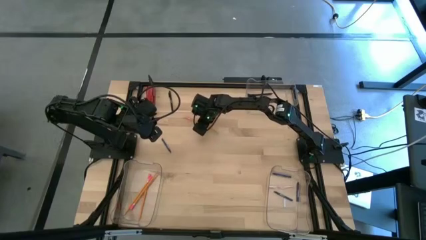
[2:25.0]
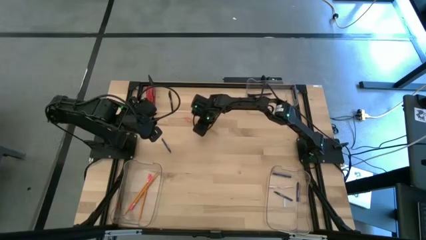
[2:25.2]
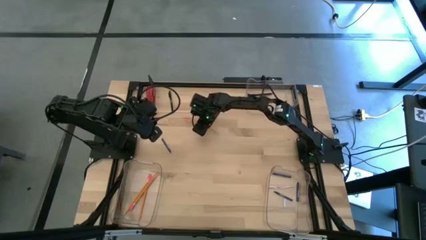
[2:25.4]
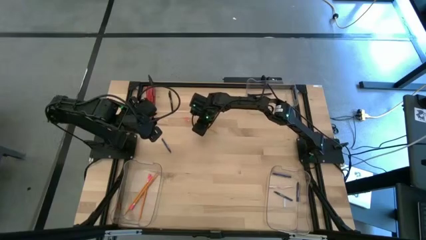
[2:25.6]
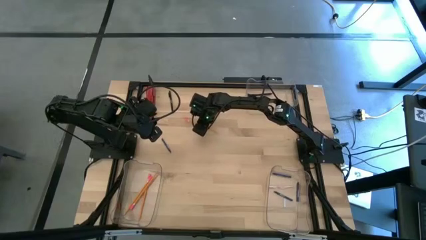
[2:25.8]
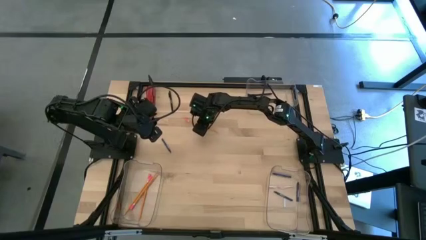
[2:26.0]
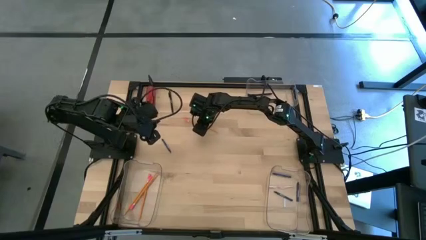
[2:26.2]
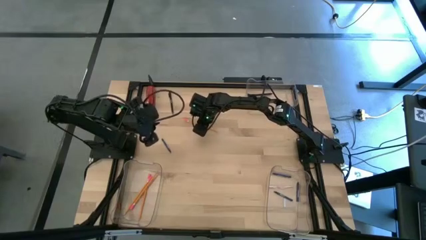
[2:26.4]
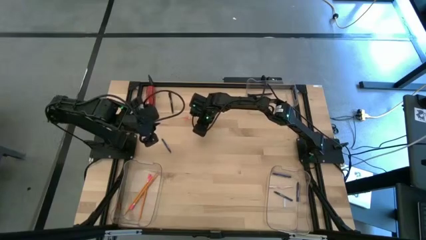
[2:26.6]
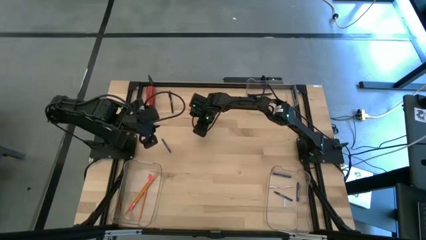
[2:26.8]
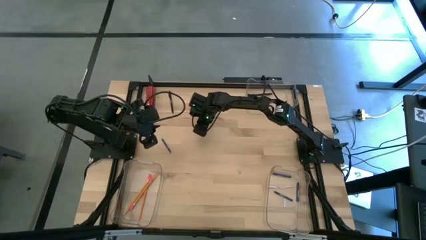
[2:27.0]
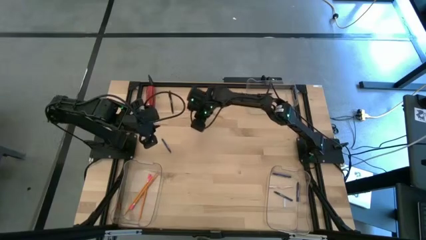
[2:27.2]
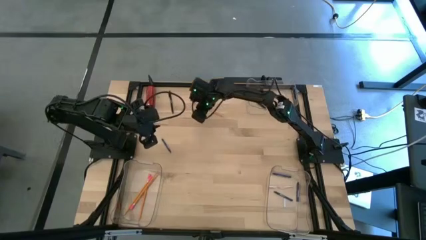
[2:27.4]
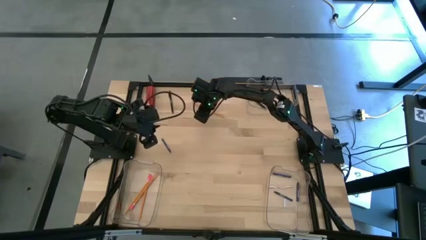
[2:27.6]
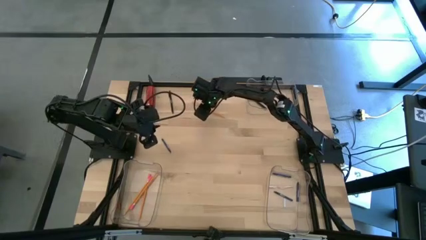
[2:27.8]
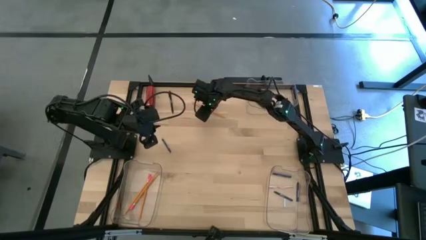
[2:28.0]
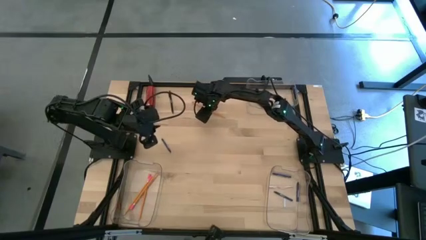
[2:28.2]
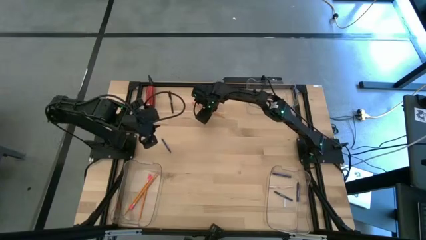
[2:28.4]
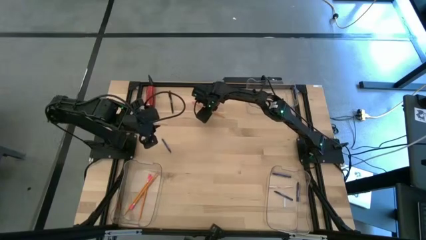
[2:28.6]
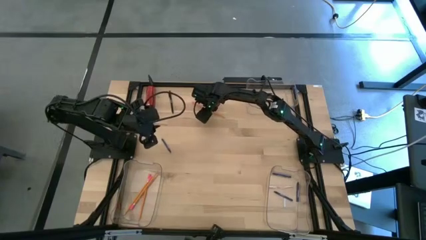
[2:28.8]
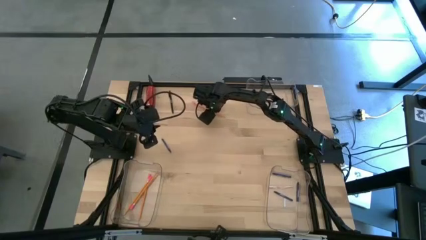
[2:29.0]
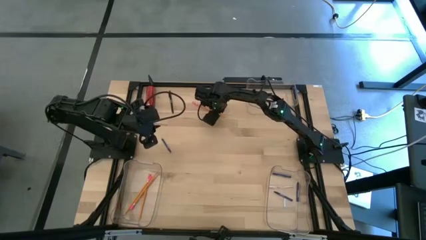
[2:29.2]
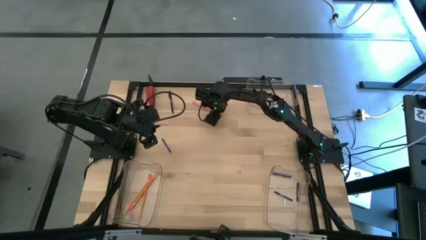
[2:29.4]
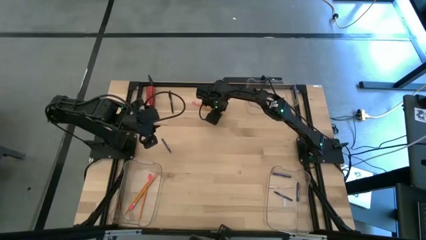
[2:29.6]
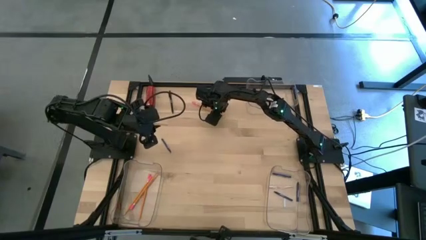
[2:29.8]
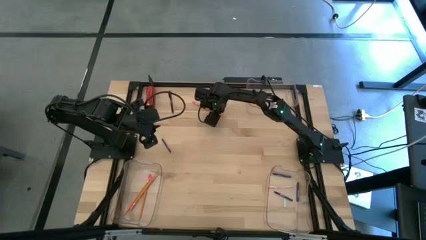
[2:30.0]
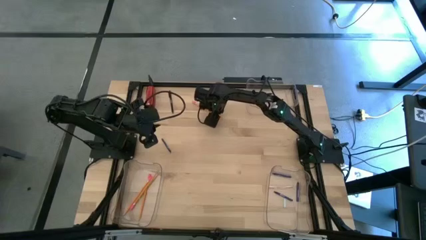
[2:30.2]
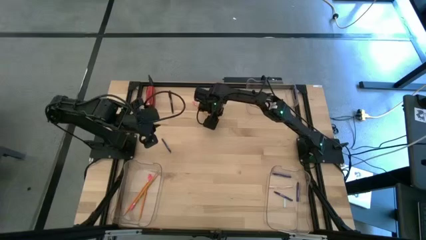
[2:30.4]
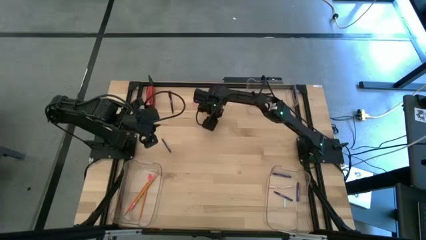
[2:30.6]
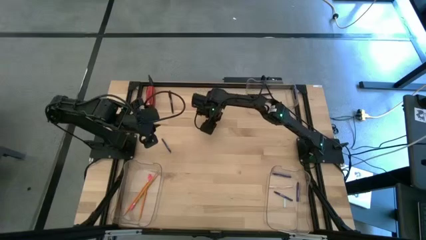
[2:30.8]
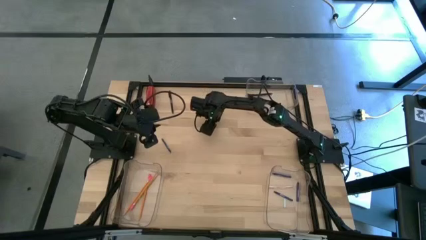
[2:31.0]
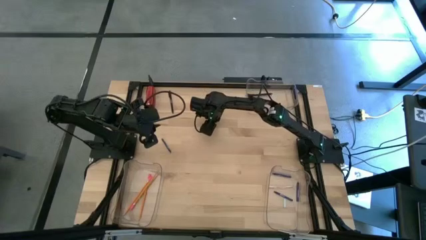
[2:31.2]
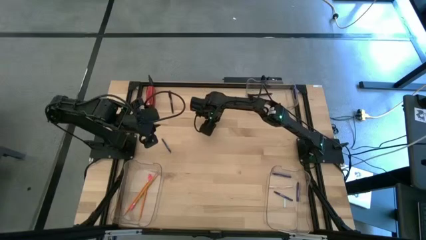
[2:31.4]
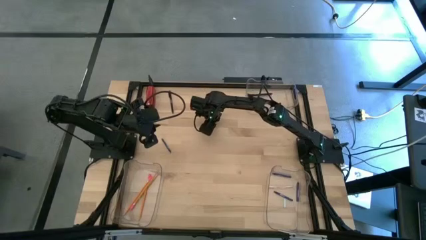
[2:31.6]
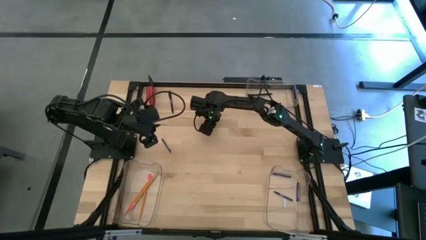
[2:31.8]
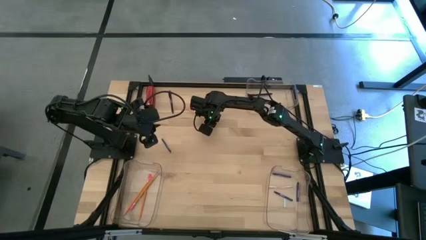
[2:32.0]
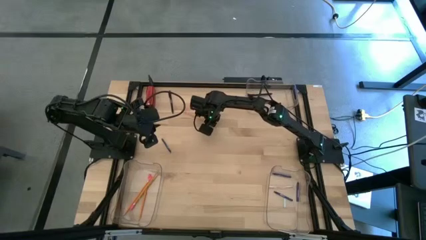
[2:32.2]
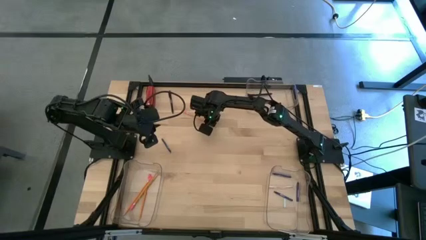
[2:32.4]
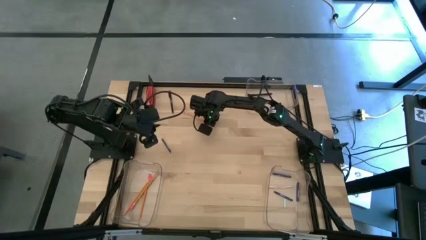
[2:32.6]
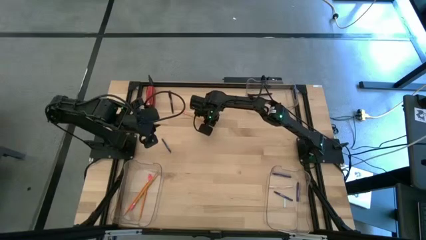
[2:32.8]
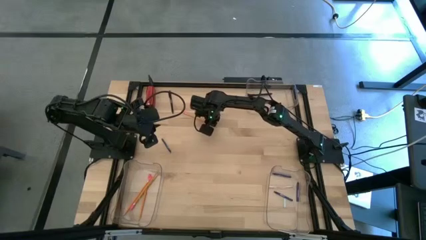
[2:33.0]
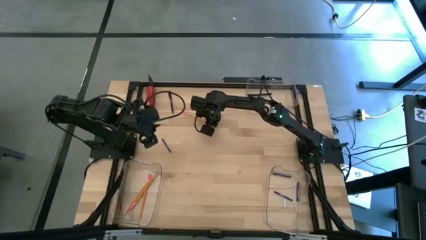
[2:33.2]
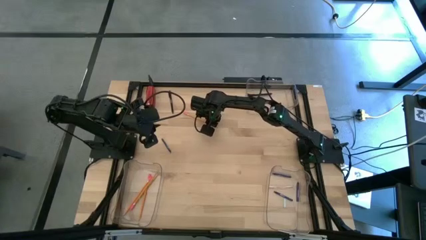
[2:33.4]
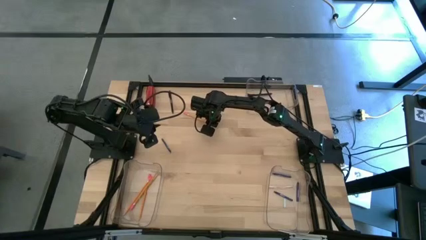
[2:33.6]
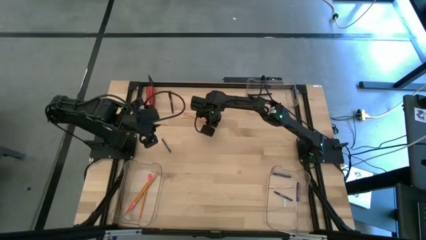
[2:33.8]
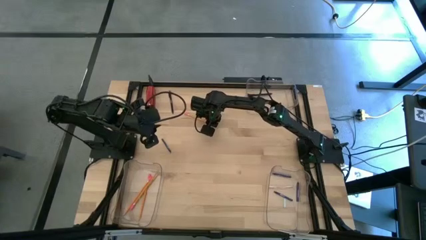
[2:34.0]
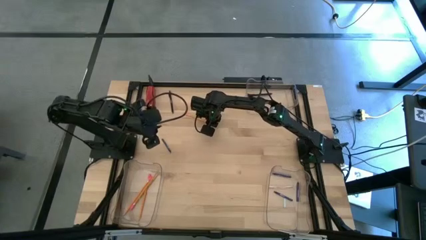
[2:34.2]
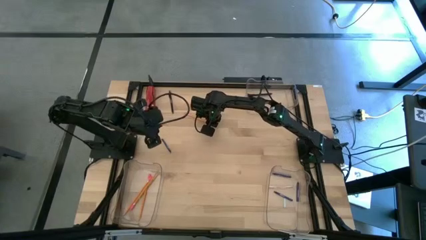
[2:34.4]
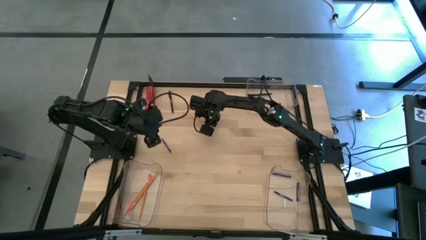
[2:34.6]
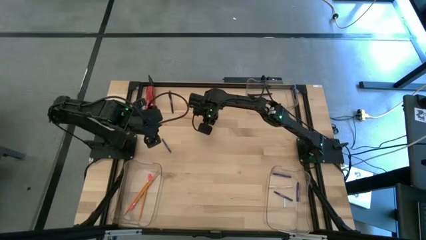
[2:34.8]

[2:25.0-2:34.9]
Task: Sort crayons/erasers/pens/pencils in bins
Put the yellow pencil into the bottom left transparent bin

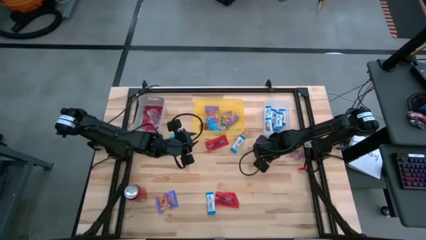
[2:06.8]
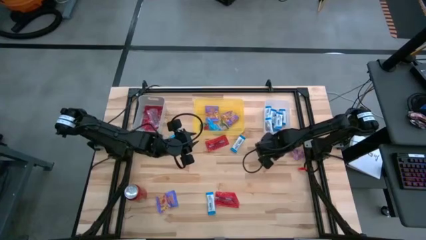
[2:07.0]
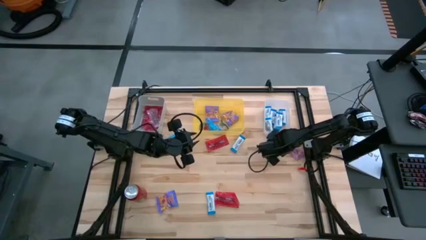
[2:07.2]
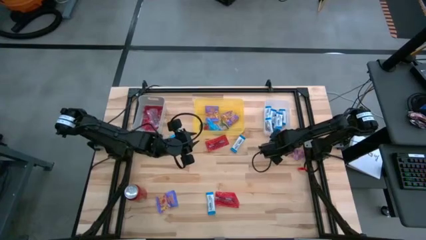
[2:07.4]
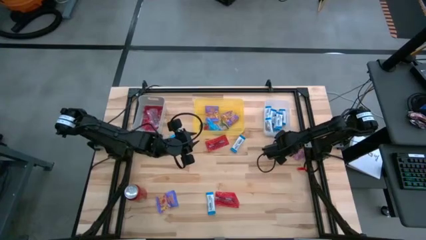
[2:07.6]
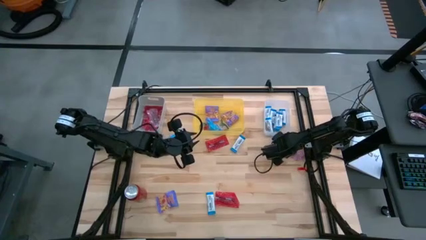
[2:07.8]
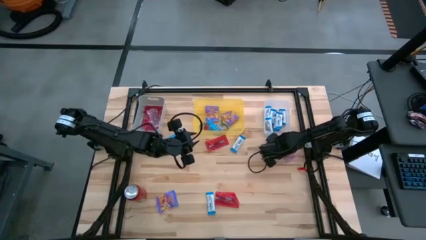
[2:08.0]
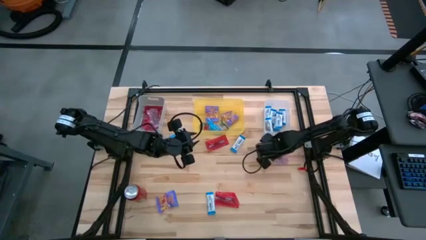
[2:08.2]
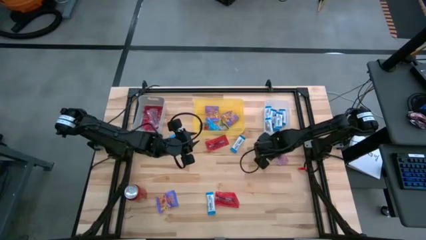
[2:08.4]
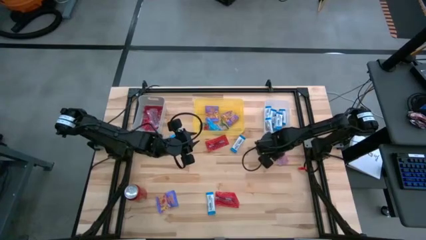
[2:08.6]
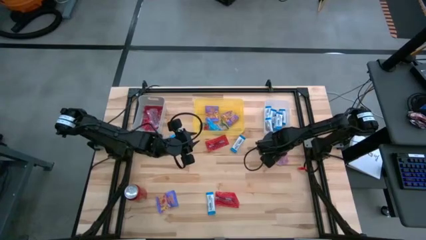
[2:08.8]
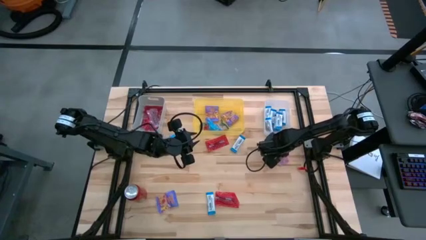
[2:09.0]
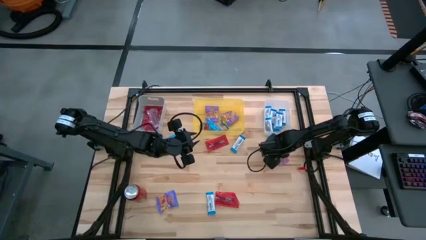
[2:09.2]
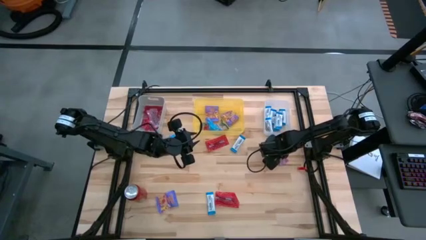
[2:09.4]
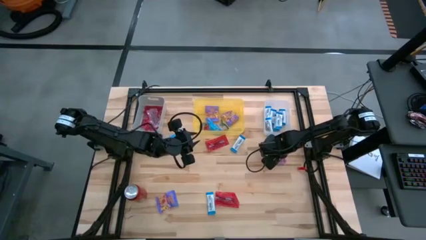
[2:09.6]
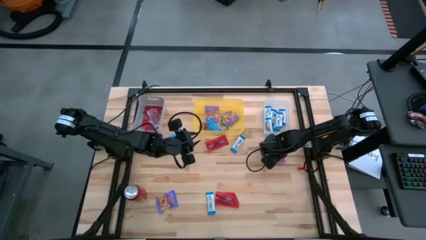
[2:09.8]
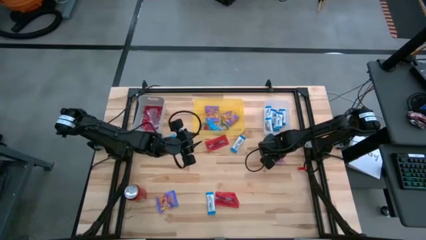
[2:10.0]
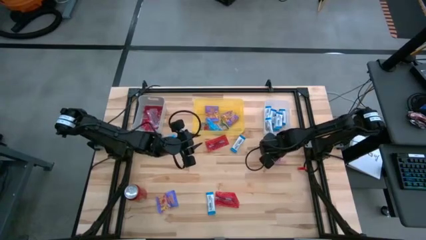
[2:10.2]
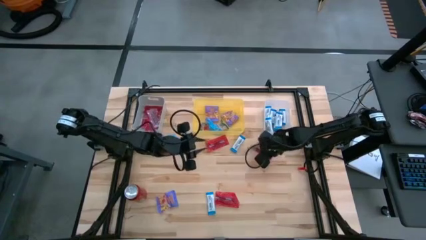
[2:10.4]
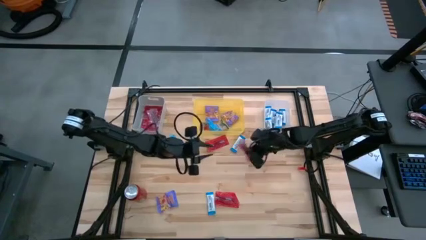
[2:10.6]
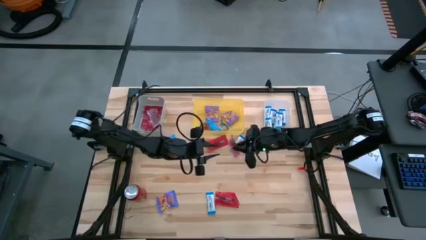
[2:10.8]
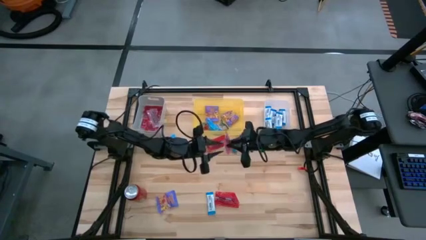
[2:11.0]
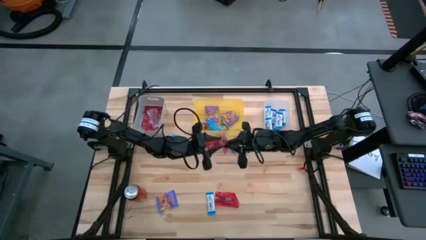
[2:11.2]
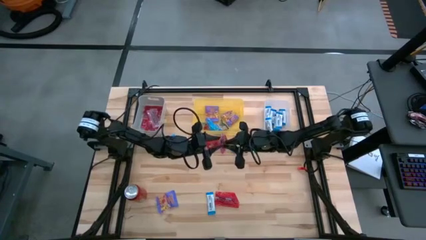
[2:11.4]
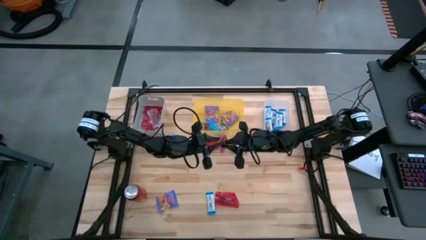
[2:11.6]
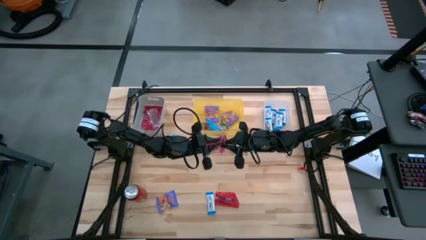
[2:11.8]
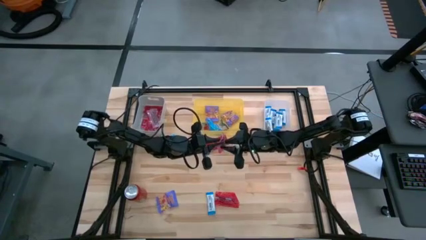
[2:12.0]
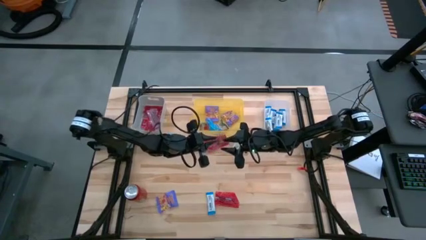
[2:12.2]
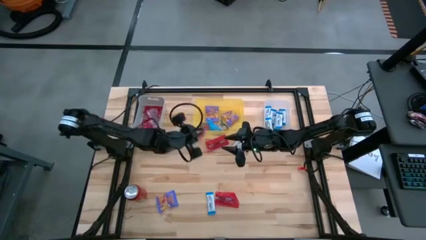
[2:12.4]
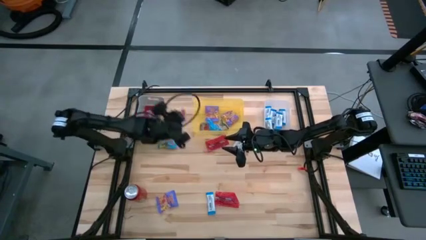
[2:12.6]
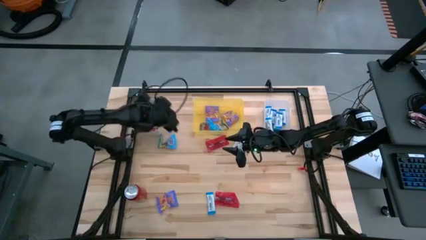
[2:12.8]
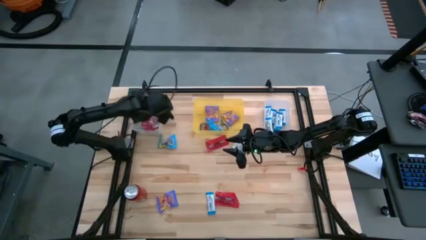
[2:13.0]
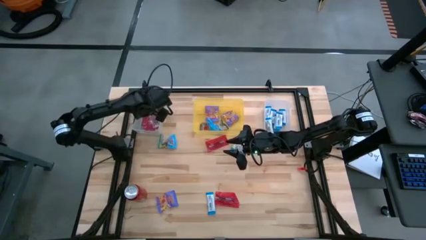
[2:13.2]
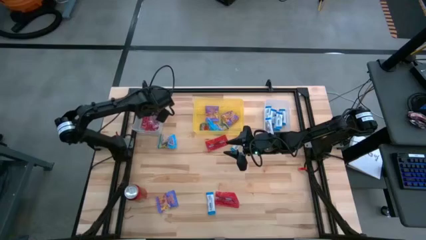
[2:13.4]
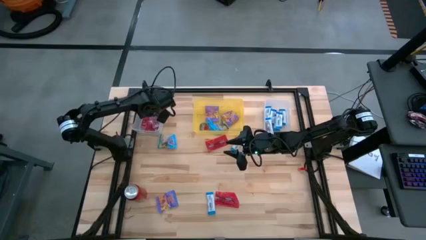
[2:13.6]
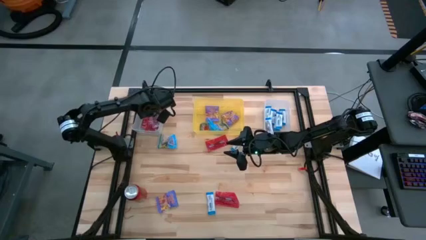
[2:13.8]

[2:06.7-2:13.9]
Task: Sort candy
Put the red gummy into the gray bin
